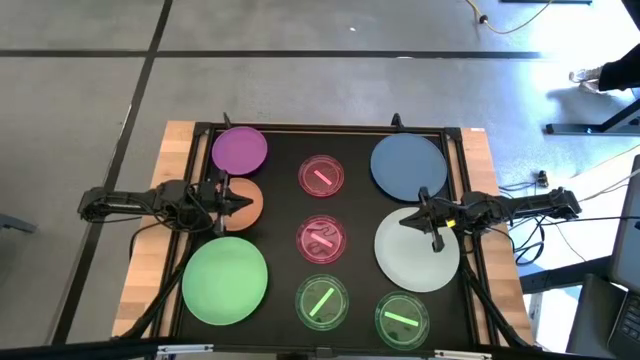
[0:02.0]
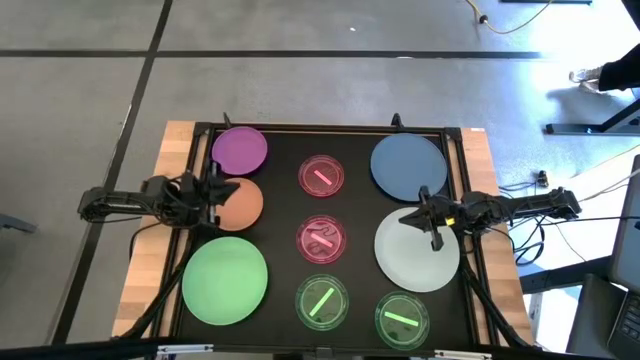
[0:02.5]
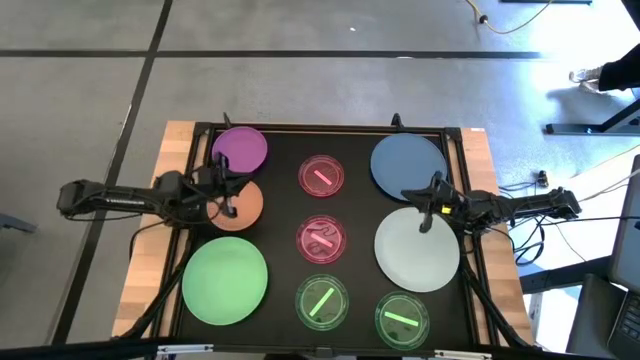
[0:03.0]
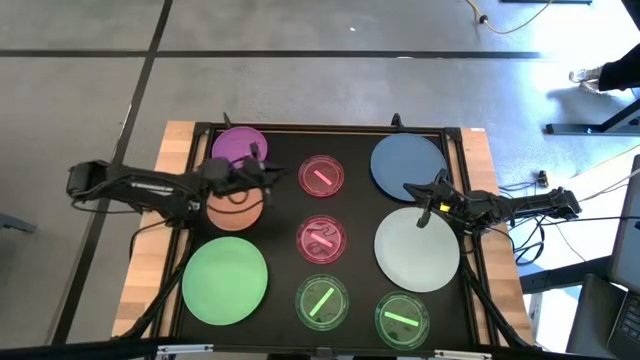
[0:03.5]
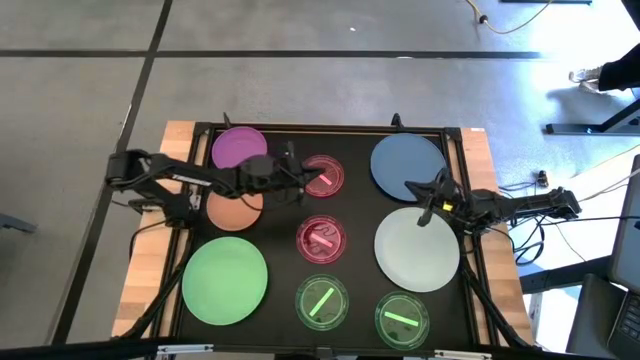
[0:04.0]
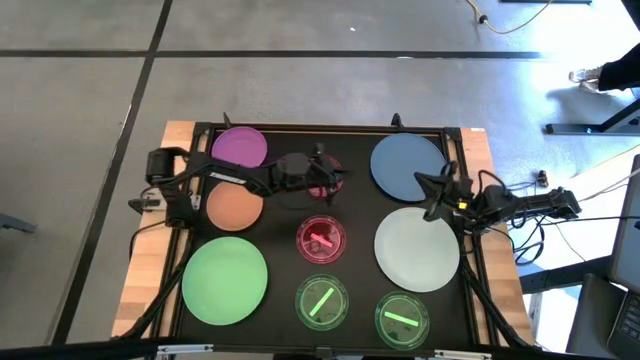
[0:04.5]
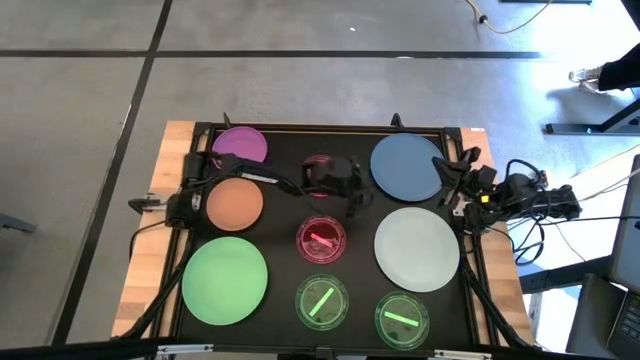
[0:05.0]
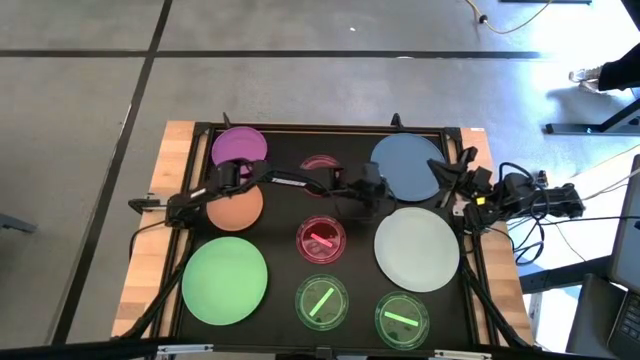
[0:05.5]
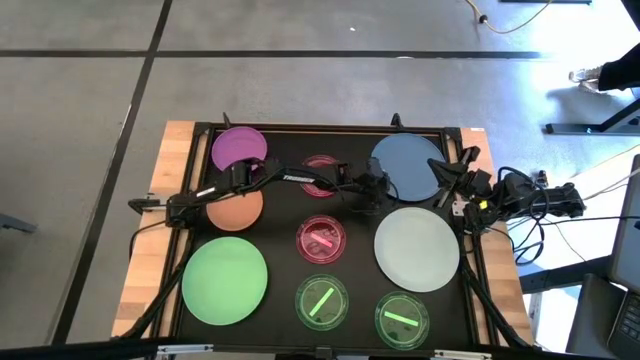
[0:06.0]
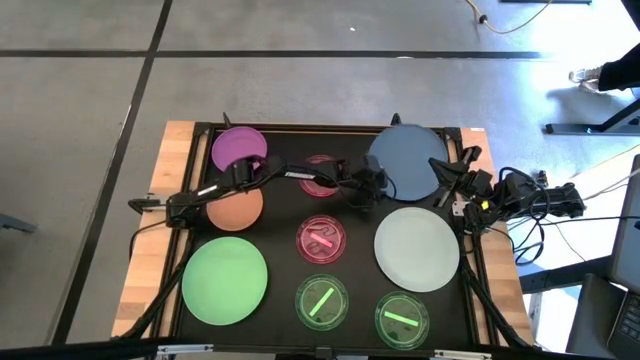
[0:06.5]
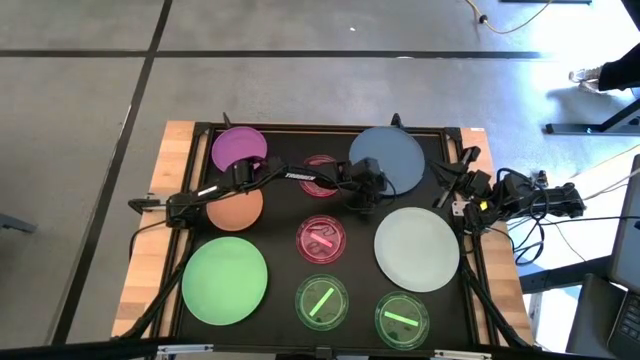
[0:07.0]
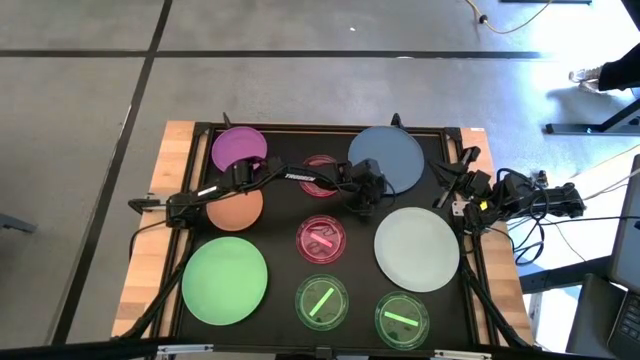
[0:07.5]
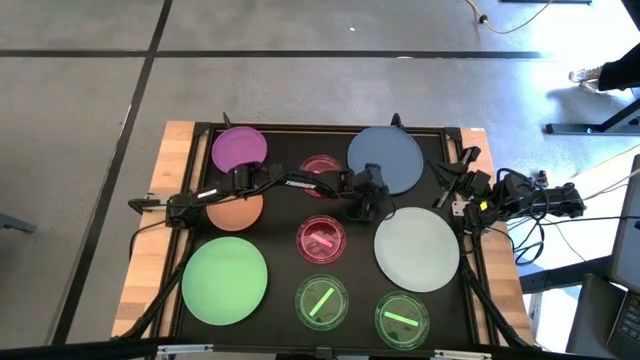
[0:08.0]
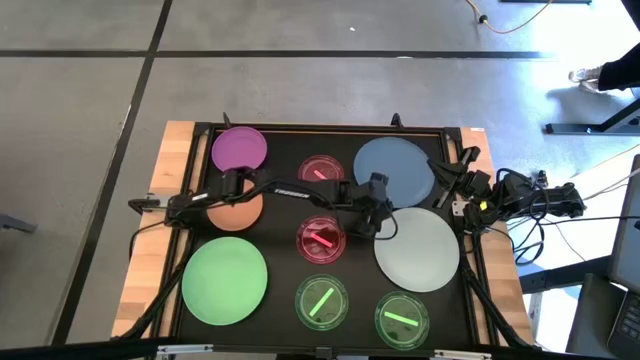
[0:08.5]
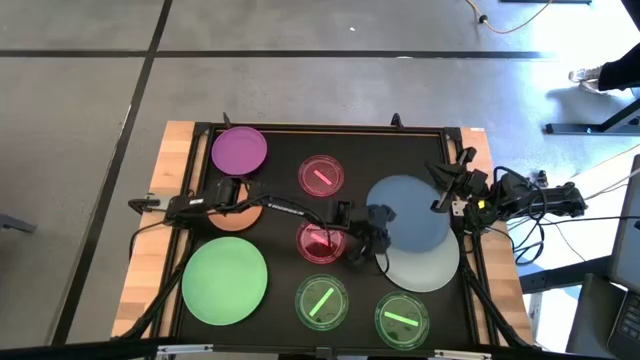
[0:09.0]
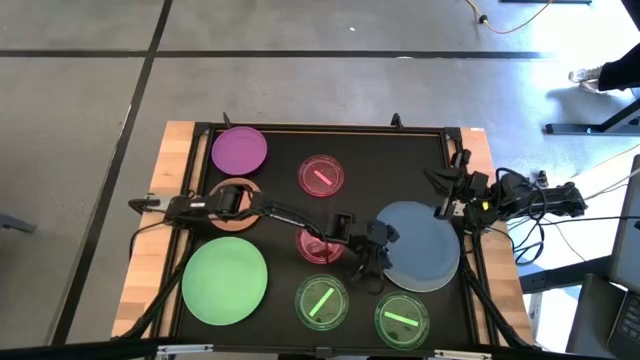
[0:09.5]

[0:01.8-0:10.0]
Task: Stack plastic plates
Stack the large blue plate on top of white plate

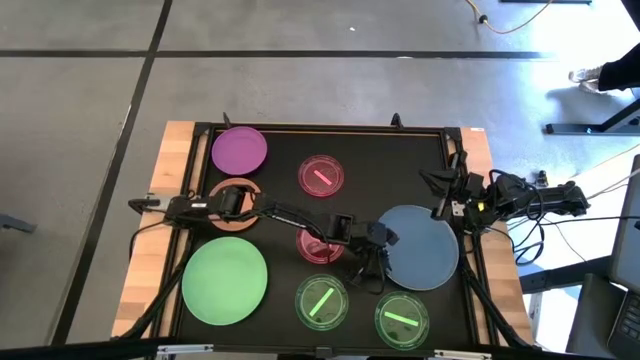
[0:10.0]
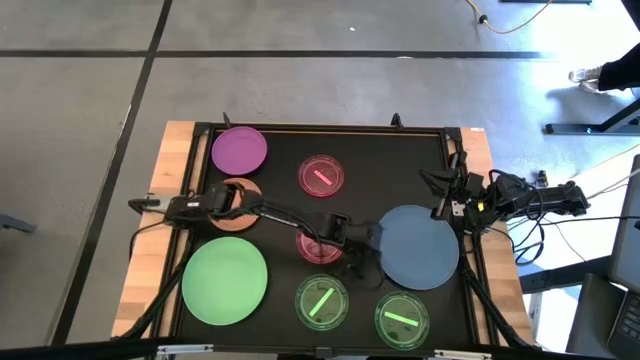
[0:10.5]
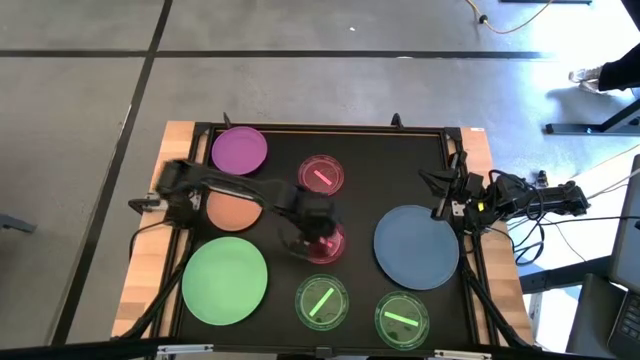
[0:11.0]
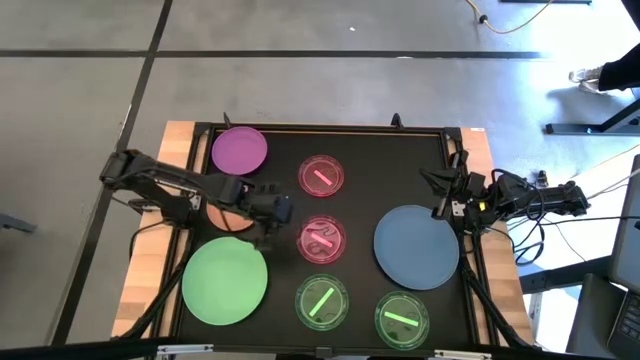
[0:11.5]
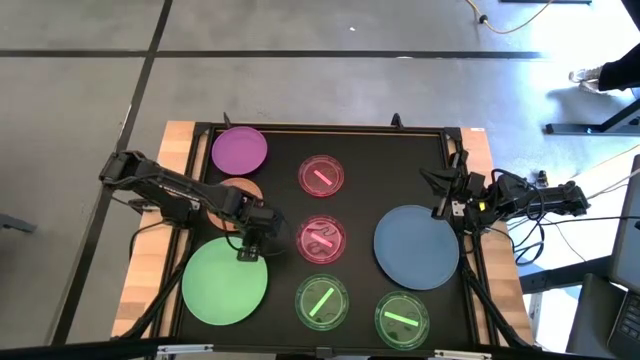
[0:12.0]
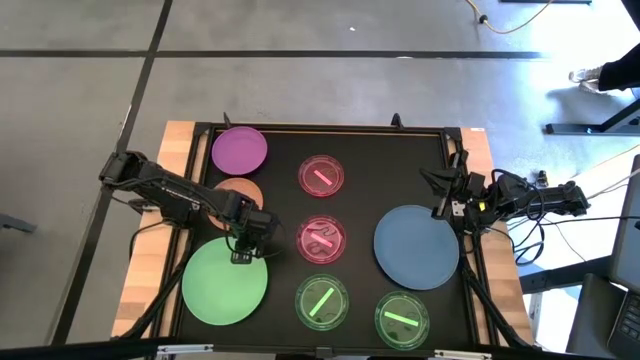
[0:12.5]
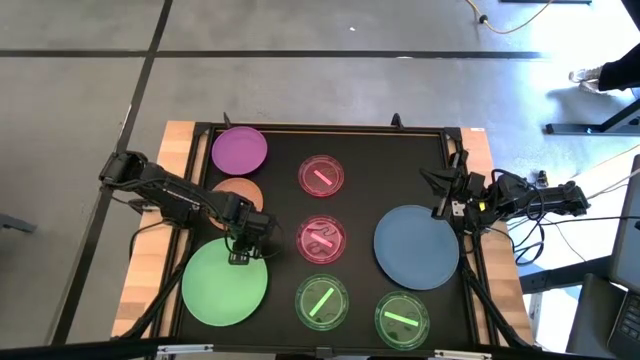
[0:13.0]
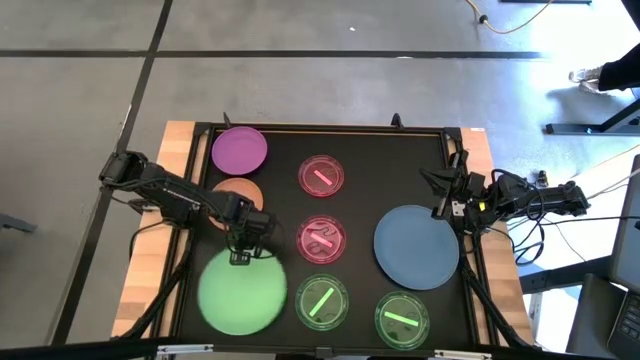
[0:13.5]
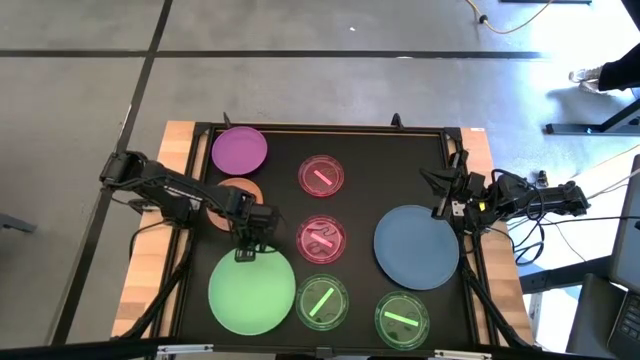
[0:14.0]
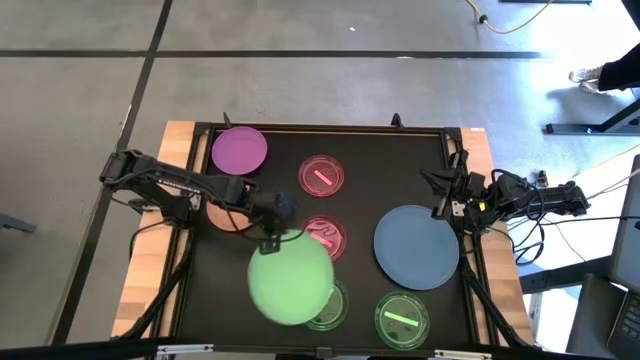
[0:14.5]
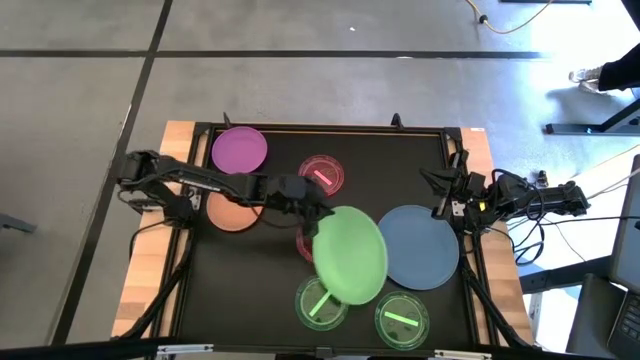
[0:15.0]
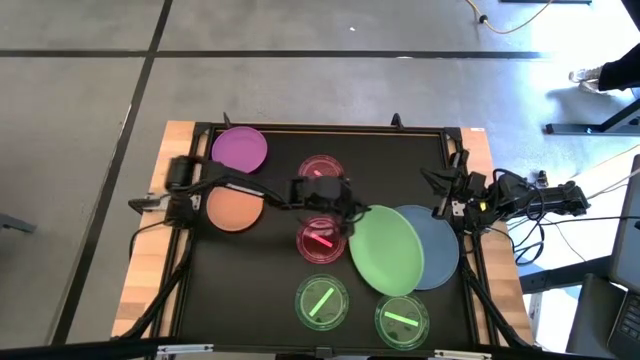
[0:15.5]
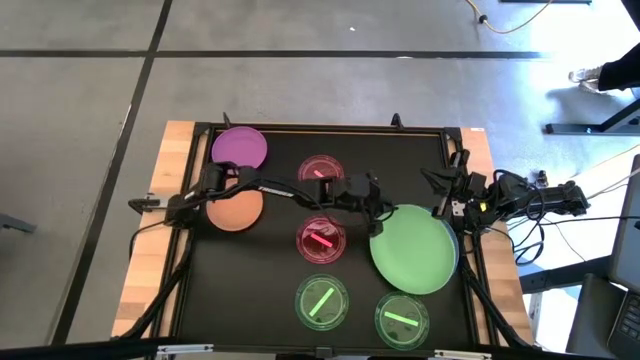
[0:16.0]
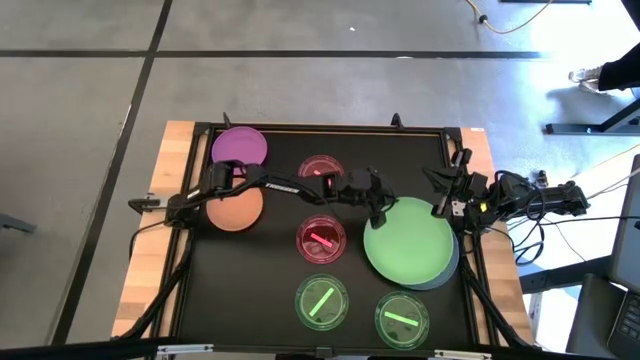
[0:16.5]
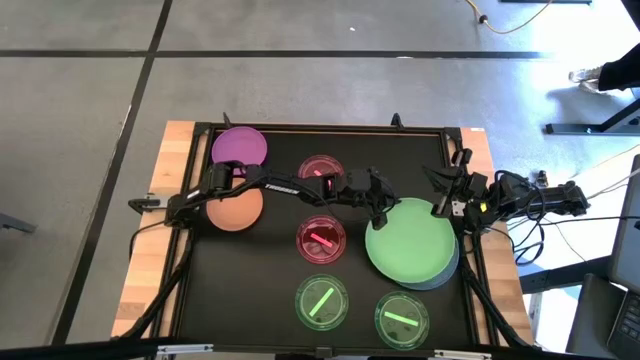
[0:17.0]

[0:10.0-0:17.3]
Stack the green plate on top of blue plate

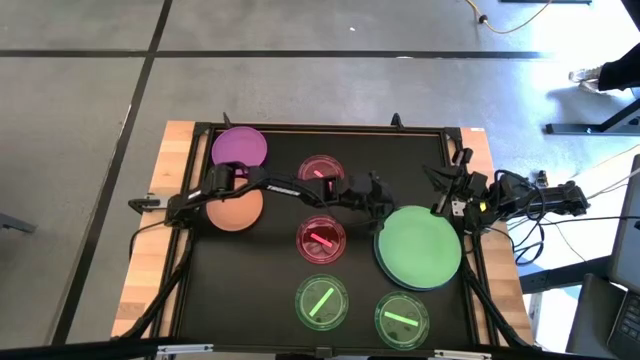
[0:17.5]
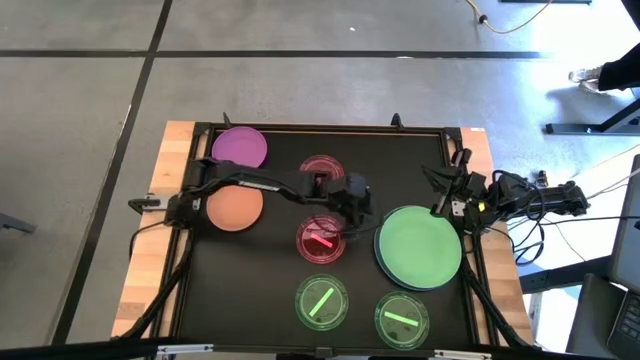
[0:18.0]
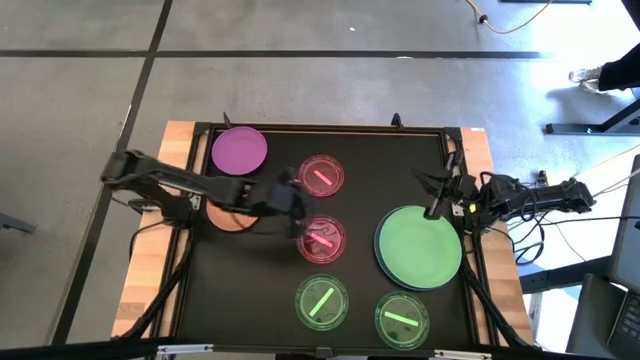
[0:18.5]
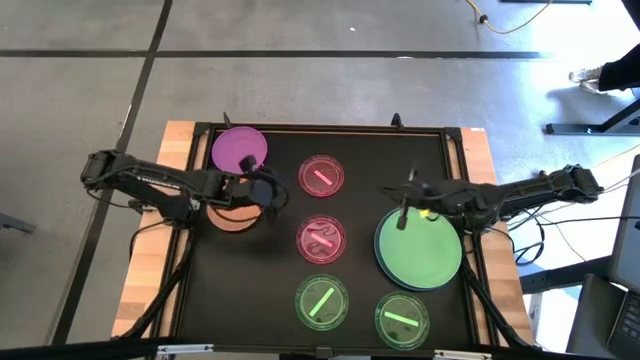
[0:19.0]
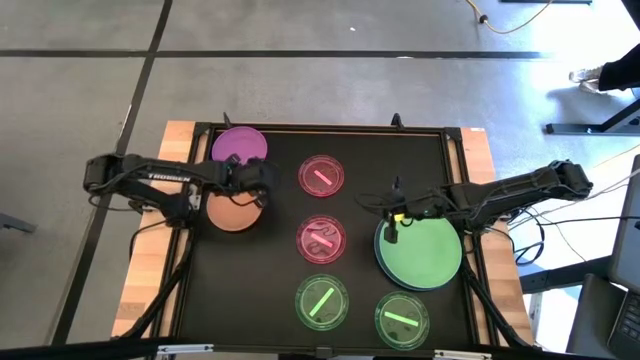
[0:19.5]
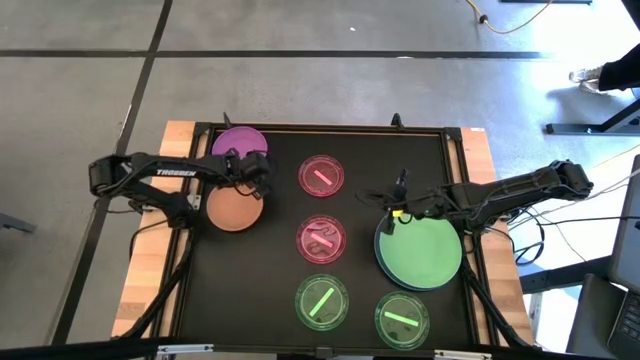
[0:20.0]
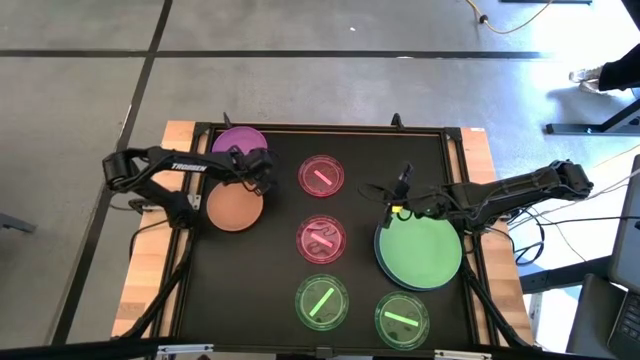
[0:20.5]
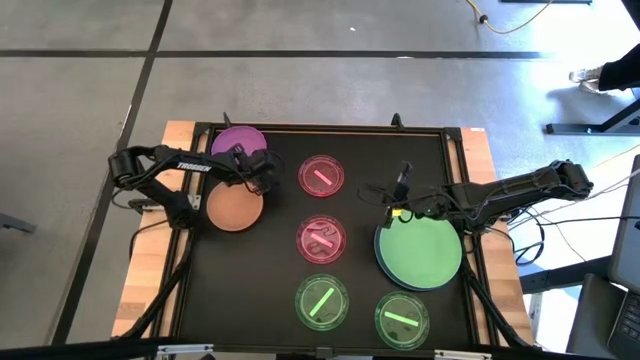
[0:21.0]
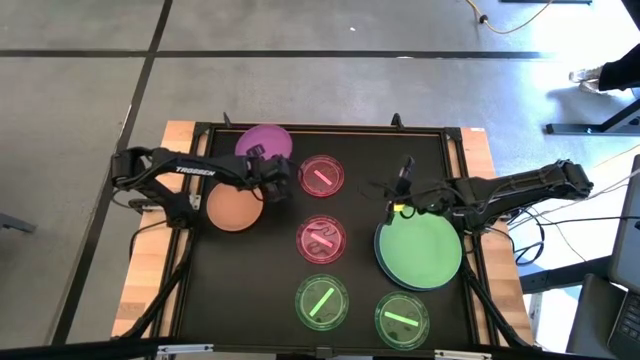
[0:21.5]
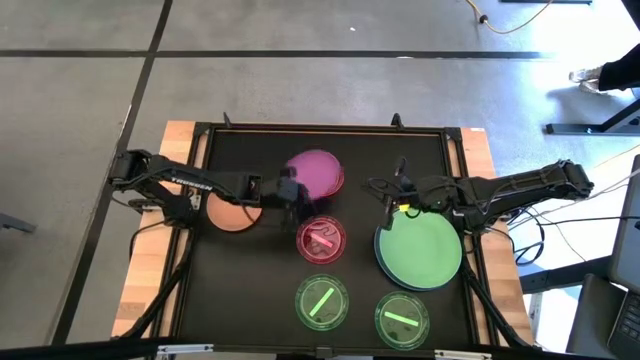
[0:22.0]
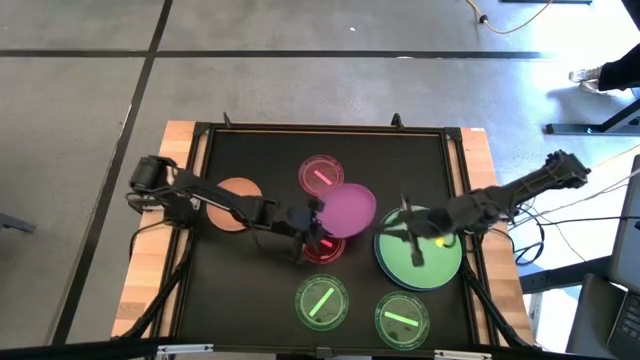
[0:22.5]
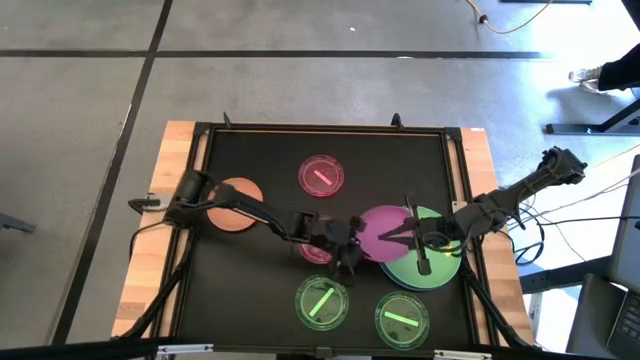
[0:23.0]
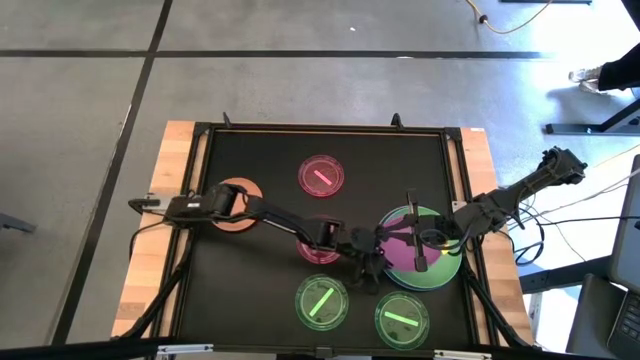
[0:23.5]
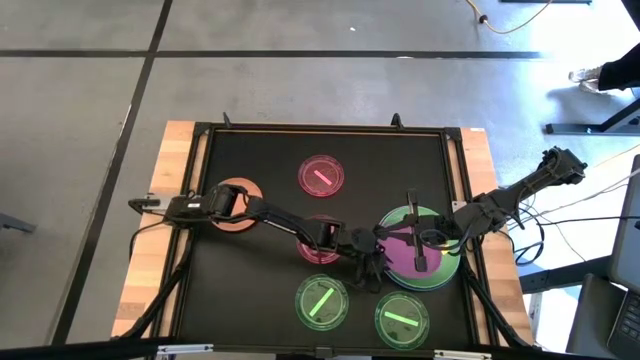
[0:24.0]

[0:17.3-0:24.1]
Stack the pink plate on top of green plate
